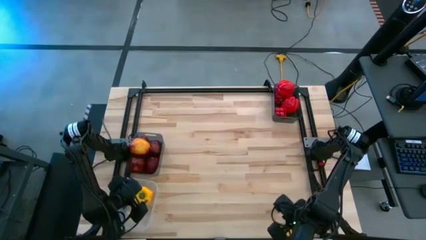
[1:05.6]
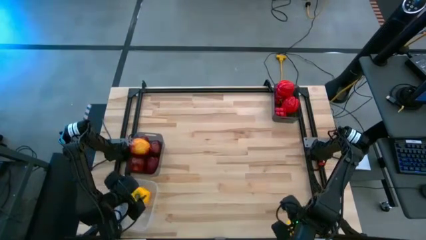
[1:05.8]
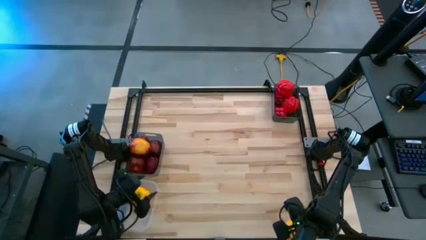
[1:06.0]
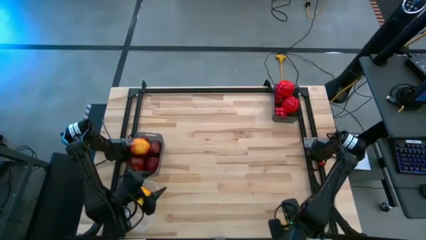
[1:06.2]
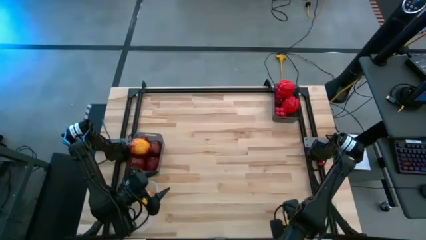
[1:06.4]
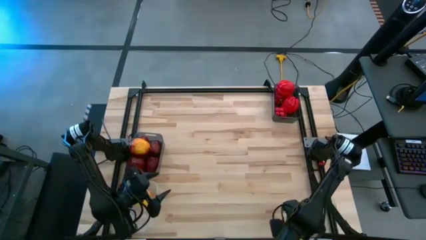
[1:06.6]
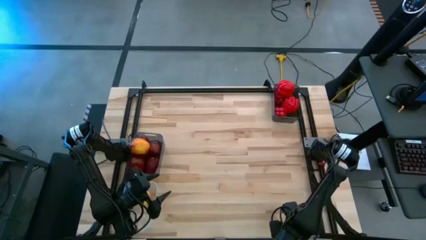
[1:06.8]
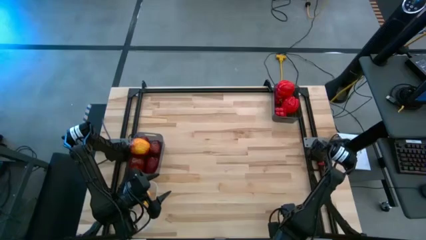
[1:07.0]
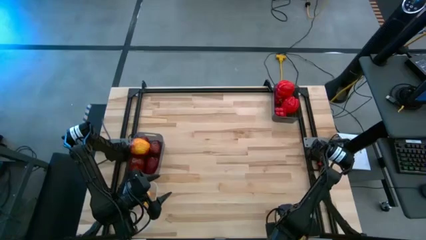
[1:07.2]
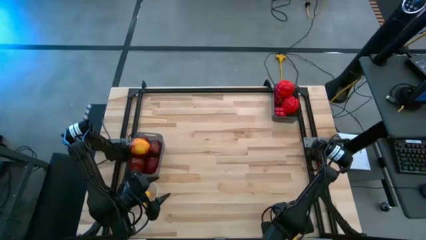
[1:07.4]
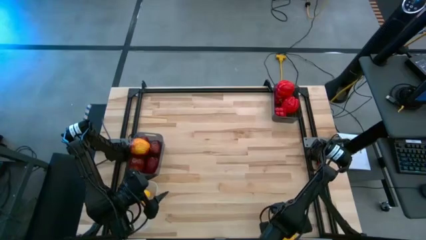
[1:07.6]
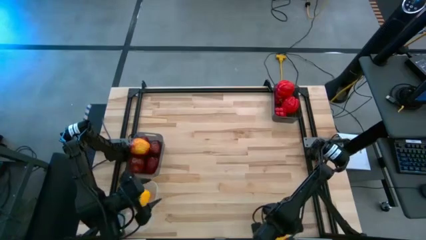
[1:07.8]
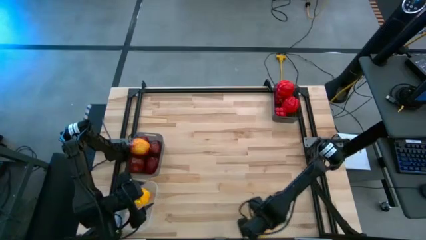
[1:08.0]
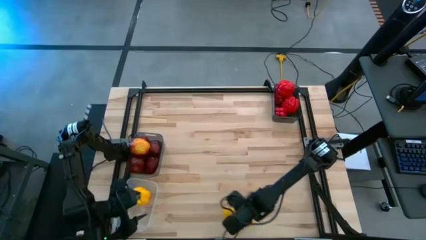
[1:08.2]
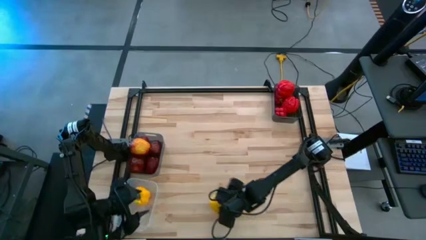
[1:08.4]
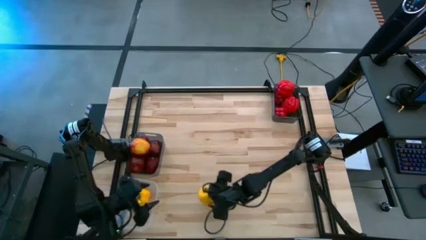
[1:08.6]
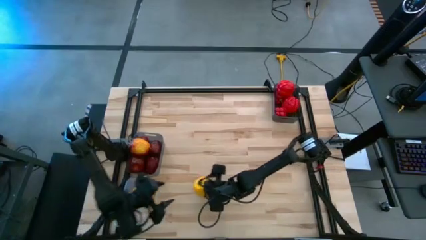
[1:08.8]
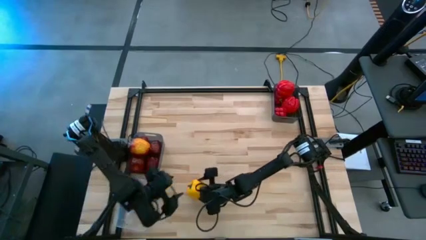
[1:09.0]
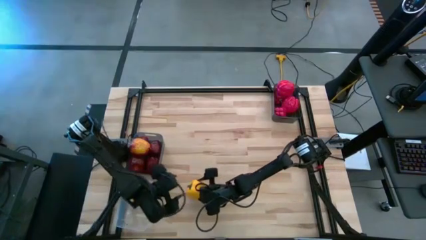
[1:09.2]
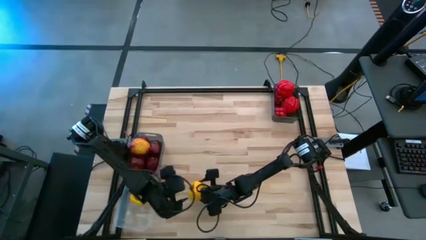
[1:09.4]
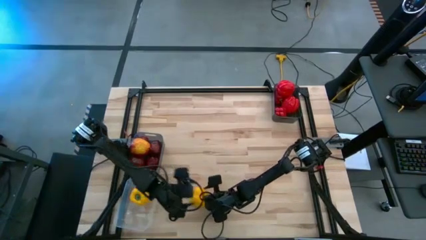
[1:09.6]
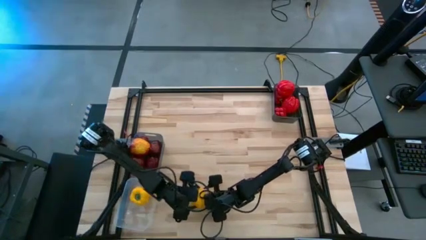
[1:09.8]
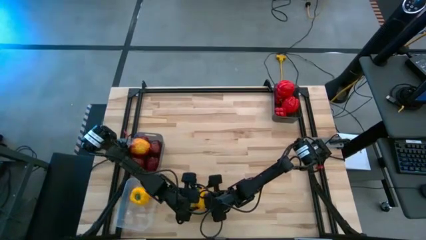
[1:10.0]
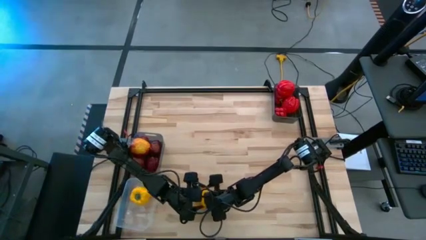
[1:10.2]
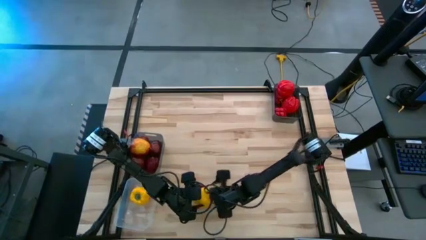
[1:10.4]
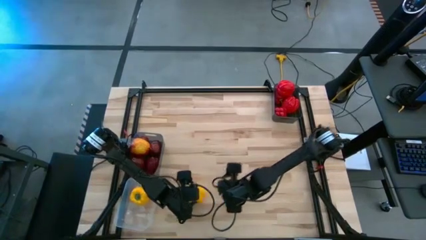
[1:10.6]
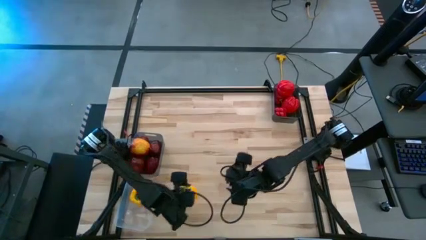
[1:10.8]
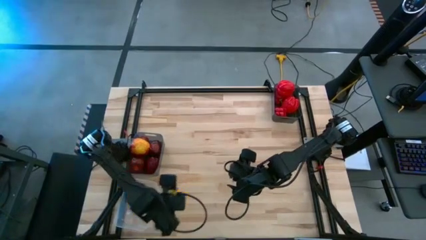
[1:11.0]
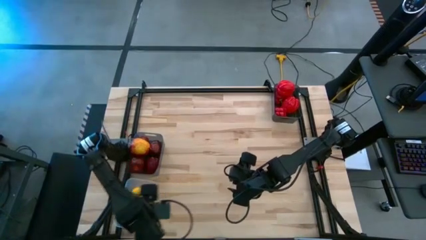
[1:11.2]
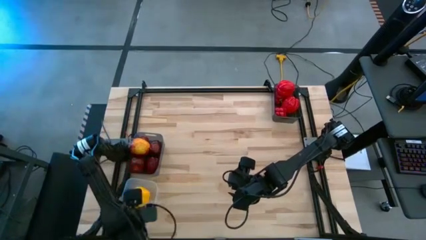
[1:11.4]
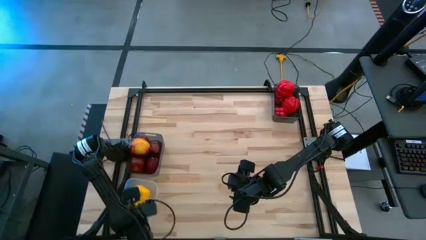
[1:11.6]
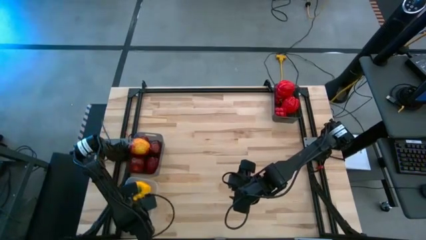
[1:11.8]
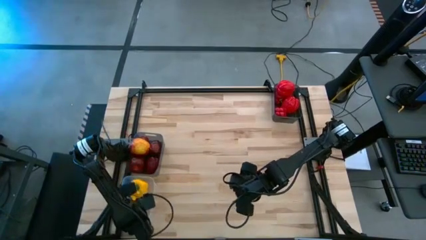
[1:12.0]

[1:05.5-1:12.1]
Task: Sort produce into baskets
Put the yellow bell pepper into the transparent bin

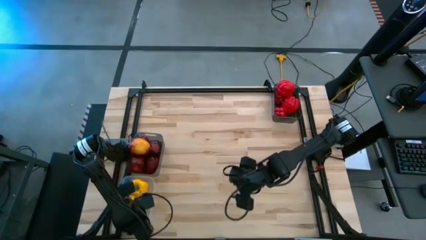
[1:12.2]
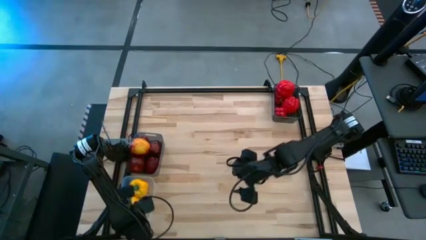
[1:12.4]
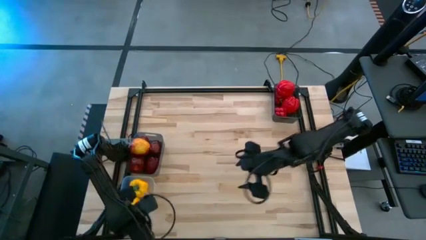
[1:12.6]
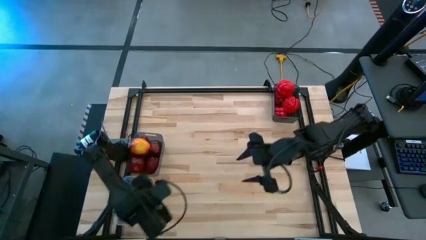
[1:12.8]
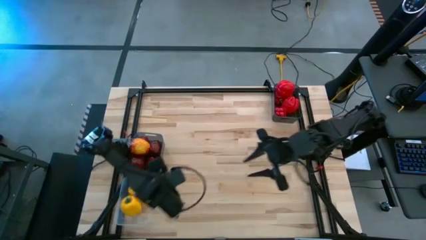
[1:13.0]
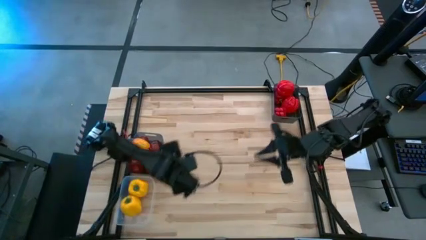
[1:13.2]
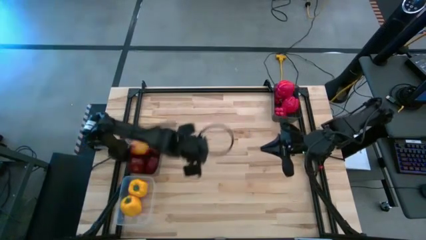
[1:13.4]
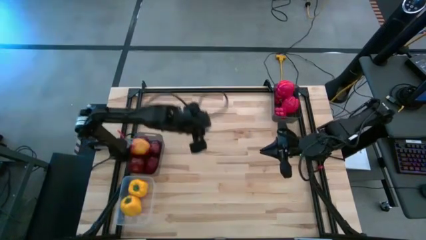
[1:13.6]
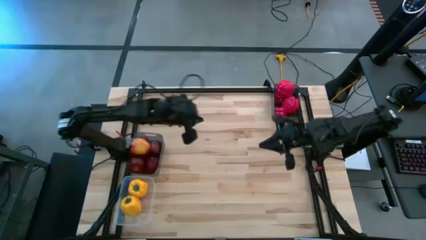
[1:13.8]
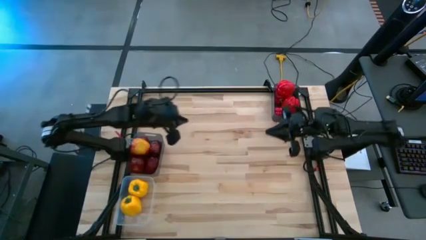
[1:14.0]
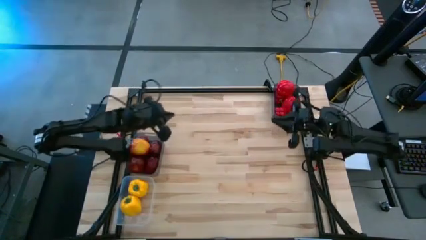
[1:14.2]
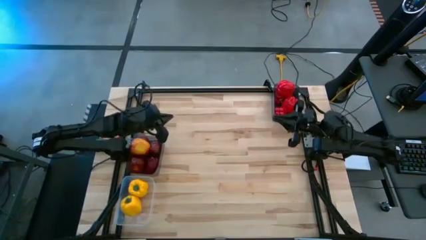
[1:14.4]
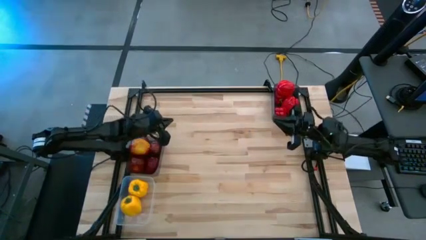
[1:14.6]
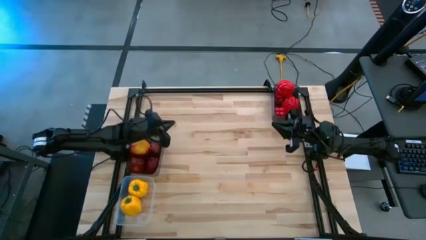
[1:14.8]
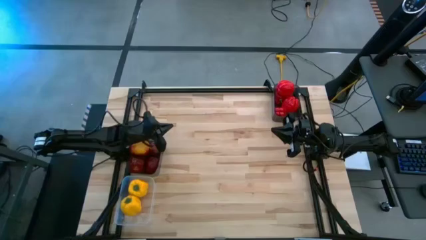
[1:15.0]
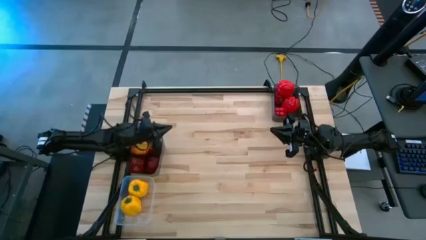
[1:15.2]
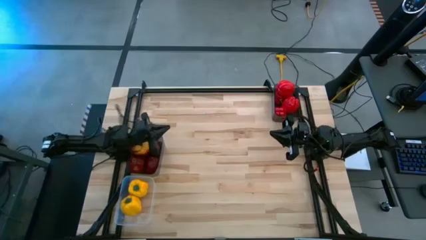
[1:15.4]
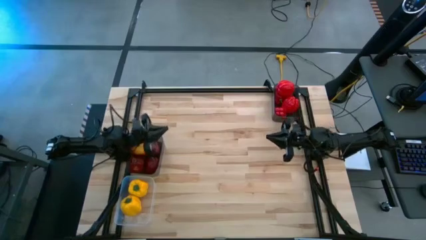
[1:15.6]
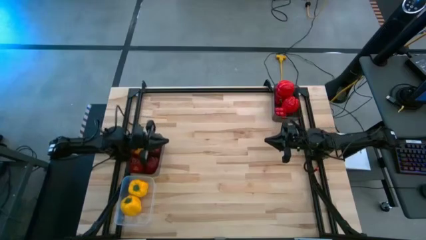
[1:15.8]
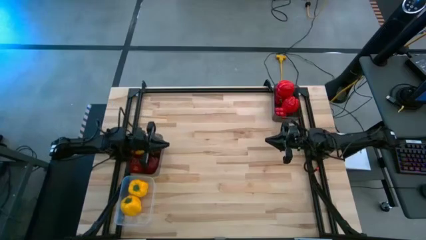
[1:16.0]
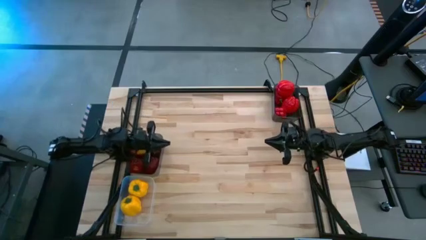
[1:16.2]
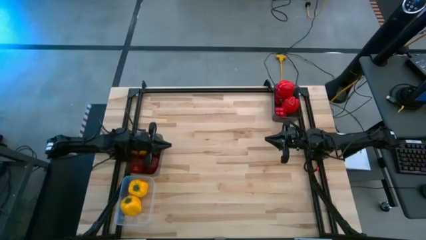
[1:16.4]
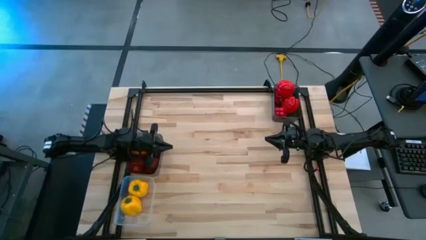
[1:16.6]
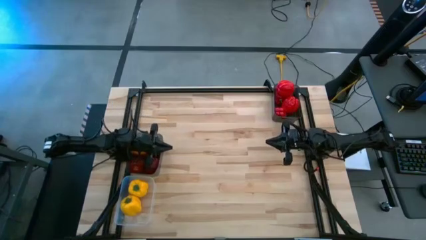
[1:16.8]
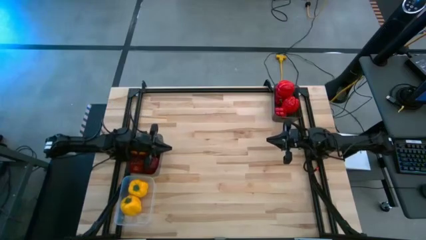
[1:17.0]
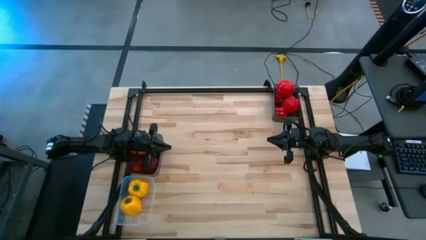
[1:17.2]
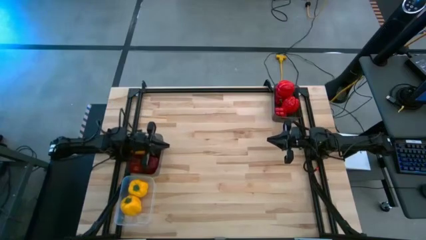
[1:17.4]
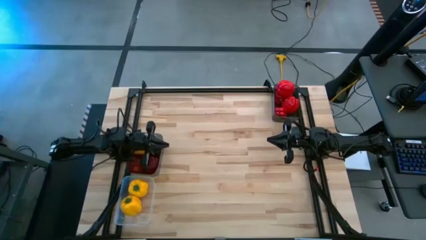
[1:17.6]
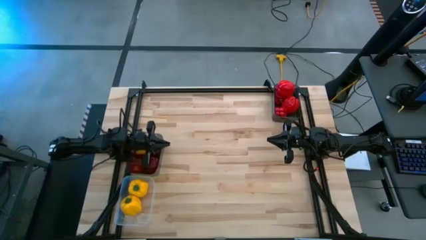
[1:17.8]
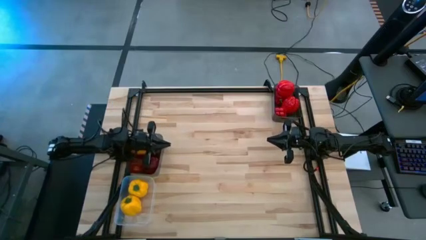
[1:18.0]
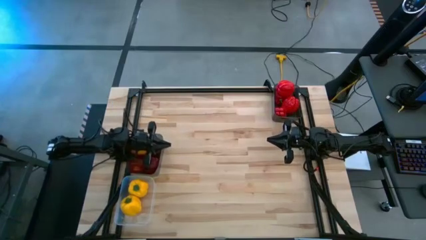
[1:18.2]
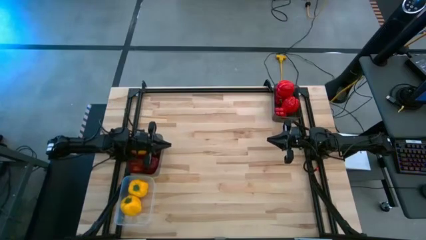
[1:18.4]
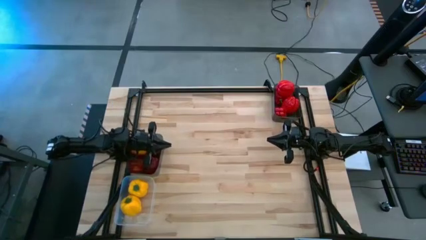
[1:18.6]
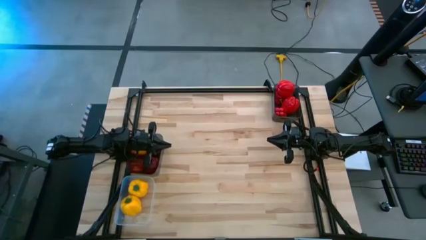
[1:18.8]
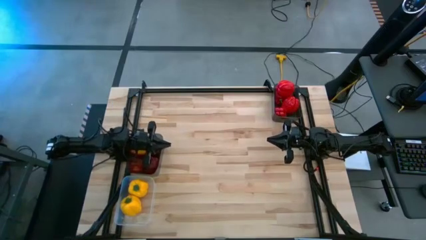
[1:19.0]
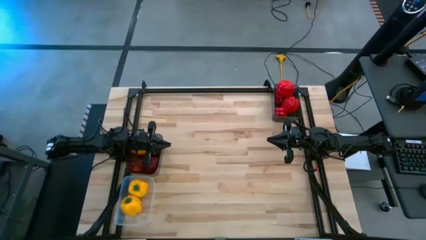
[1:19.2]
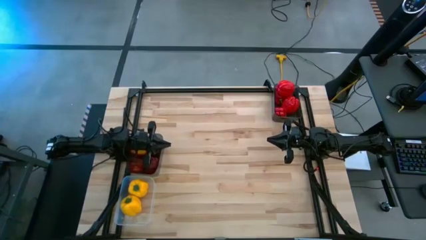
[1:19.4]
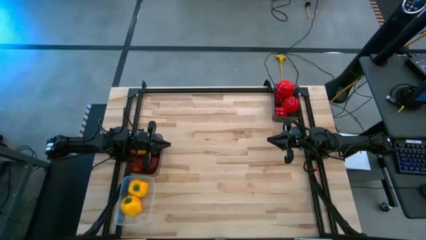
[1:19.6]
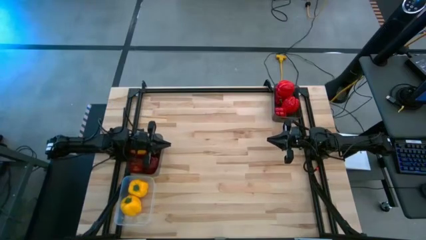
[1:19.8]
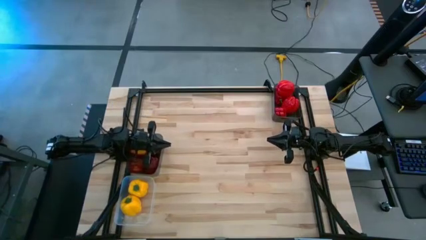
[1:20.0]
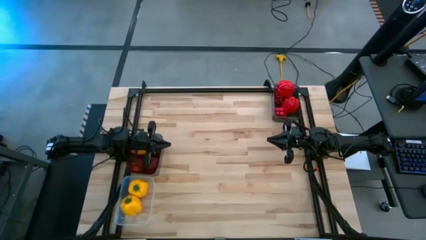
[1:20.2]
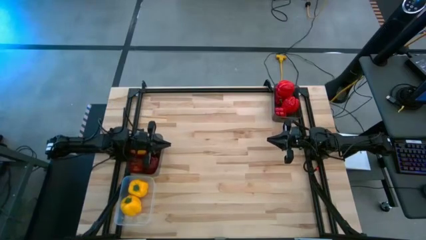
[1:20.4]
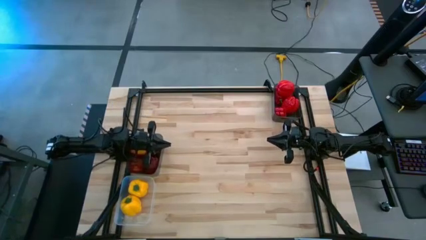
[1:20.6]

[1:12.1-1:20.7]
Return to Home Position
